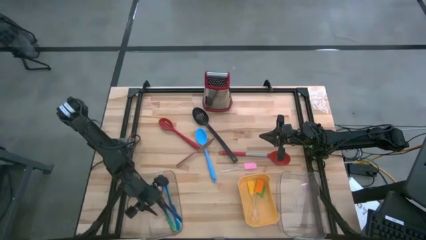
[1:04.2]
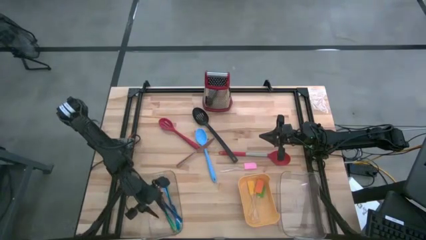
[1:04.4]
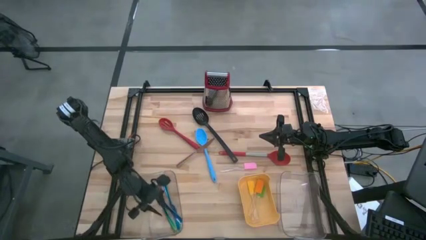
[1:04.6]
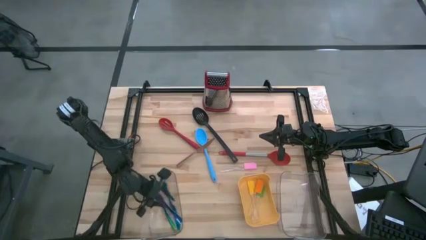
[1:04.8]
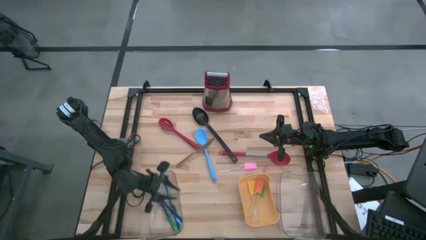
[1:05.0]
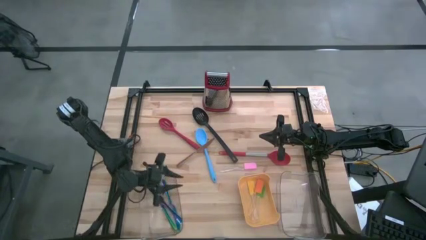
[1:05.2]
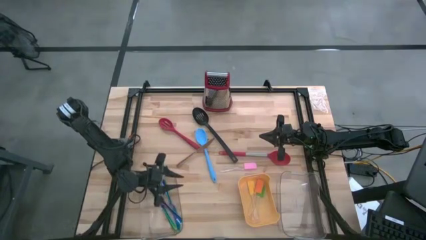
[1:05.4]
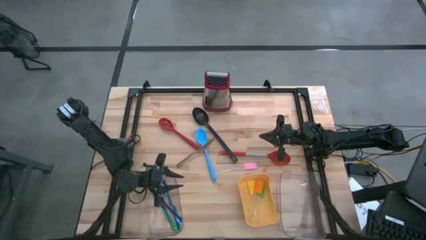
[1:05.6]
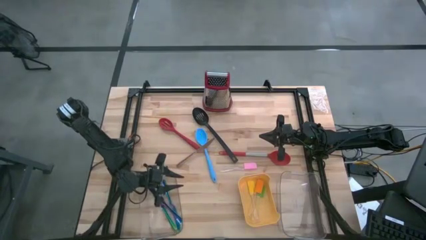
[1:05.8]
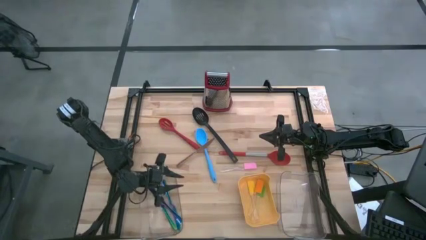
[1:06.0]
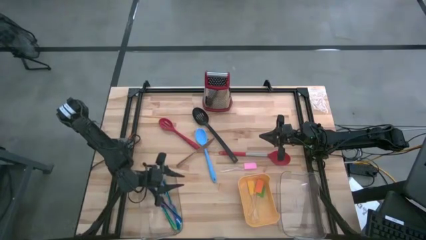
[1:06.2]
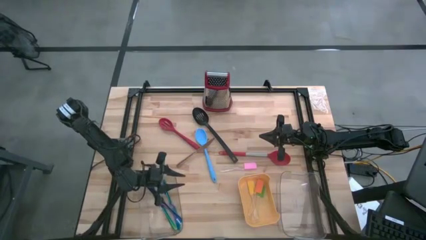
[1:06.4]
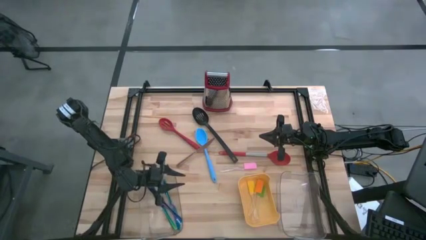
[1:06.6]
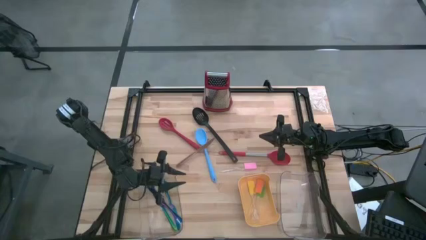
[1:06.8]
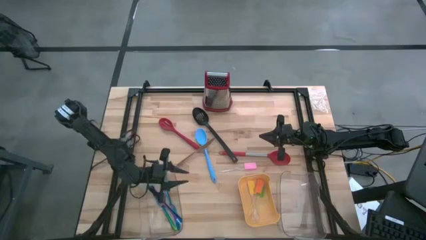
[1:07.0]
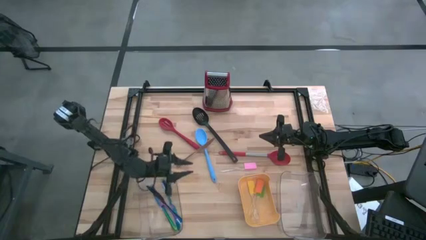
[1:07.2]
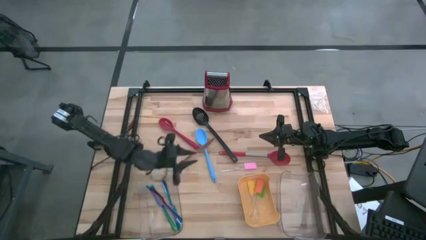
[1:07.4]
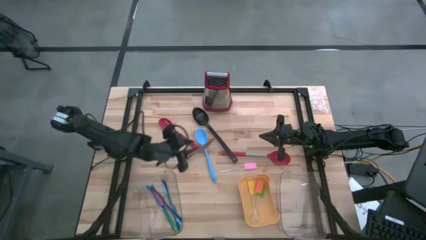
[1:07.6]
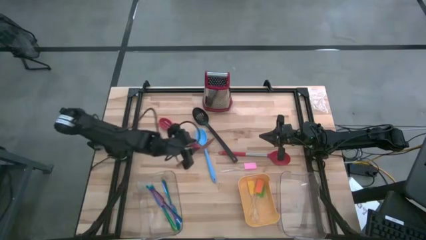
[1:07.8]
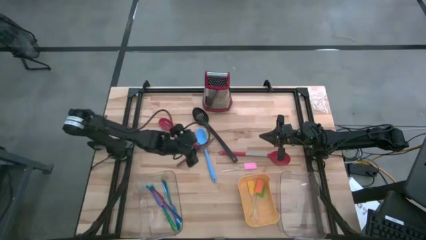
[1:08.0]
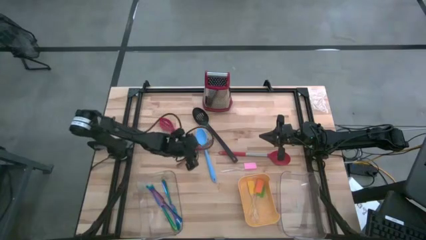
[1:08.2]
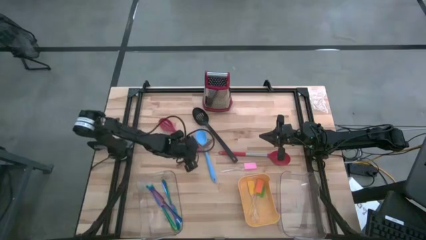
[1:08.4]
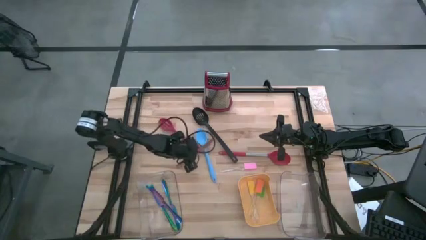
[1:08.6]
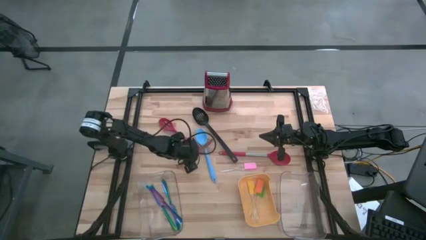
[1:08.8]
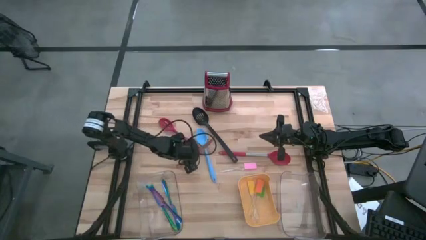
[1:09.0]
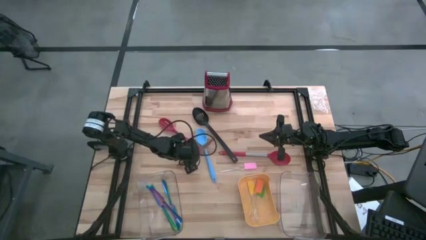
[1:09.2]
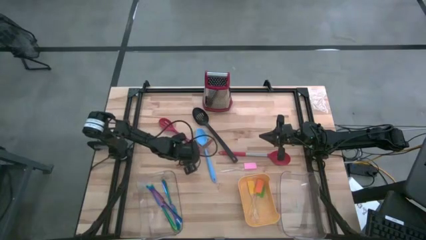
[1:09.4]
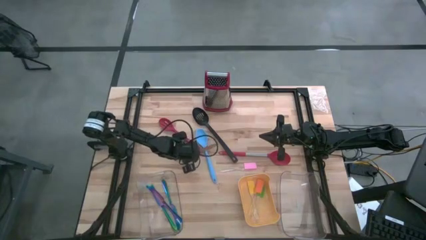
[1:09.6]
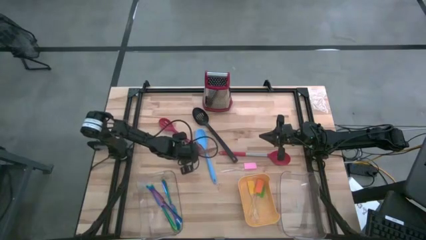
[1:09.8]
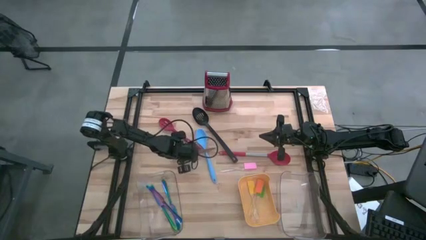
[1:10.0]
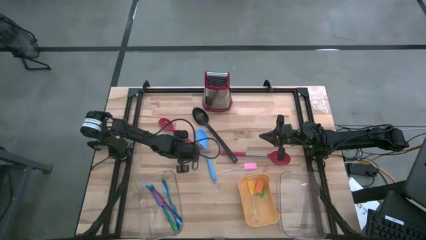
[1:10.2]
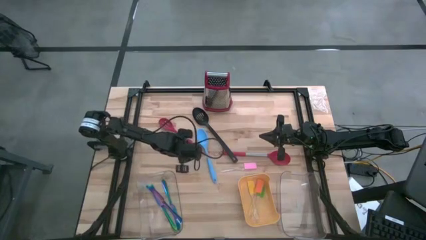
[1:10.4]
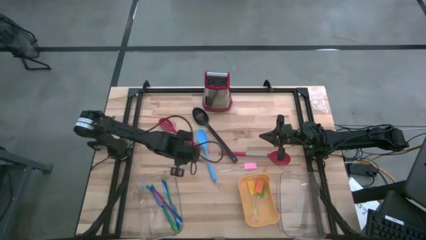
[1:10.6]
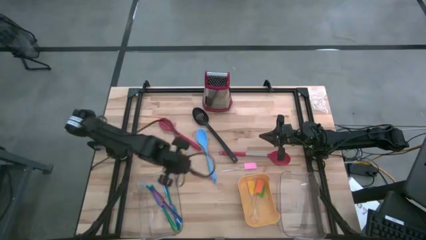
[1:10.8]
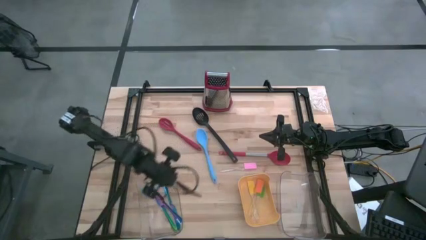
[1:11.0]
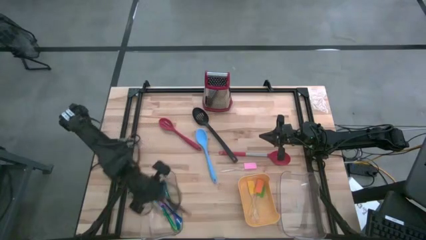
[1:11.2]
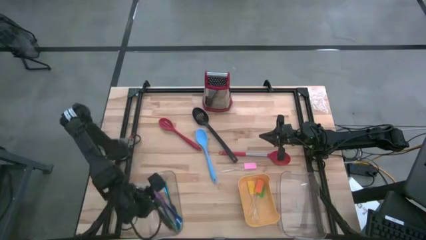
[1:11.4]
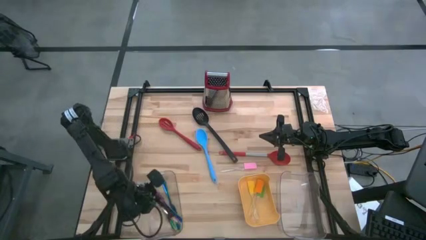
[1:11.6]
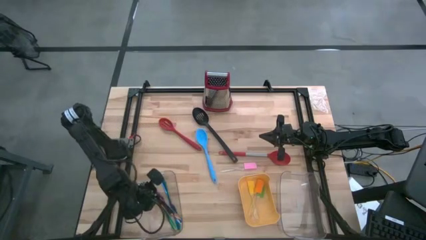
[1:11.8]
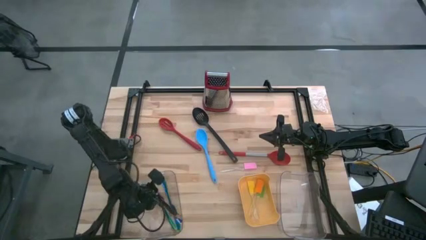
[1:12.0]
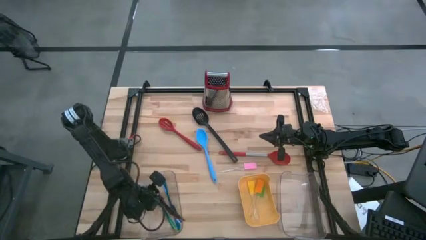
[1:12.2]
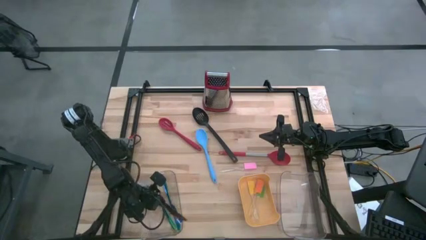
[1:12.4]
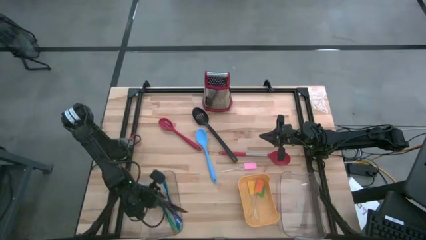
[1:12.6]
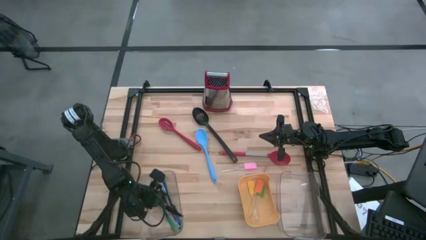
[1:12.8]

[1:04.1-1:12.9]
Task: Pick & Place Kitchen Items
Put the gold knife into the left transparent bin

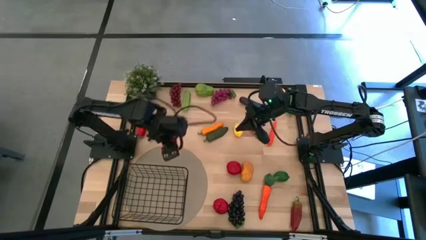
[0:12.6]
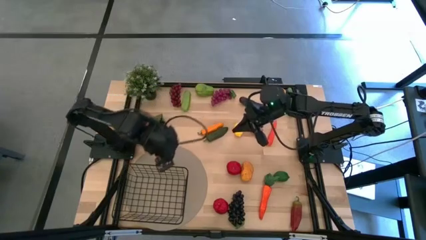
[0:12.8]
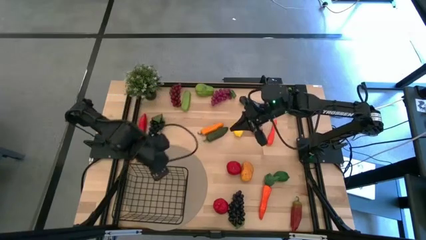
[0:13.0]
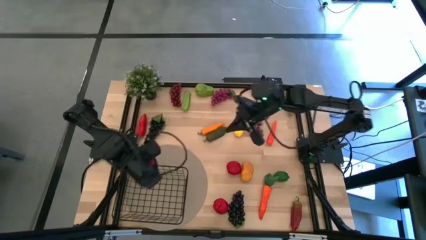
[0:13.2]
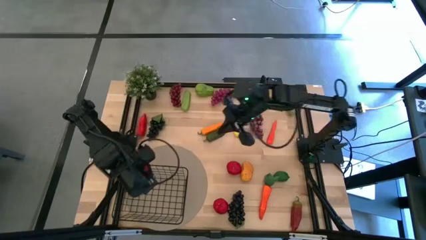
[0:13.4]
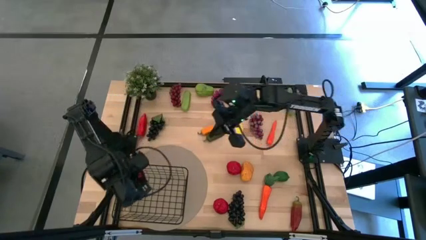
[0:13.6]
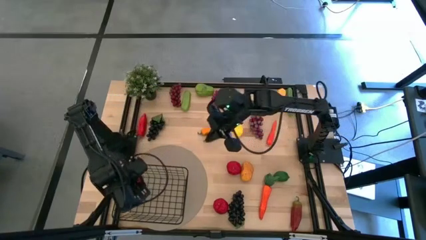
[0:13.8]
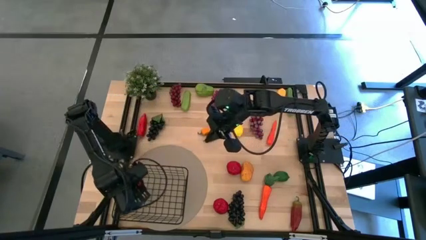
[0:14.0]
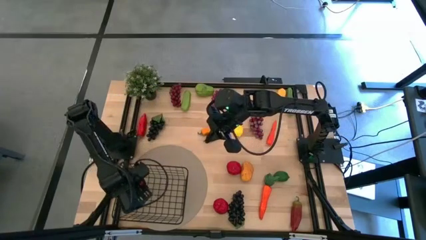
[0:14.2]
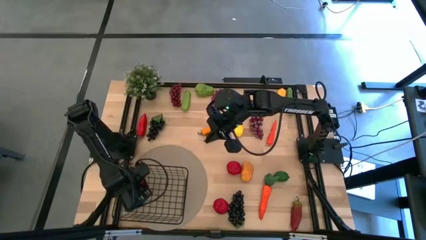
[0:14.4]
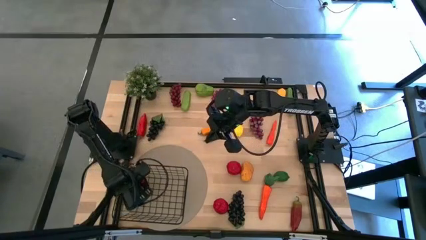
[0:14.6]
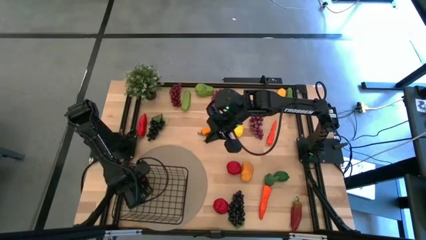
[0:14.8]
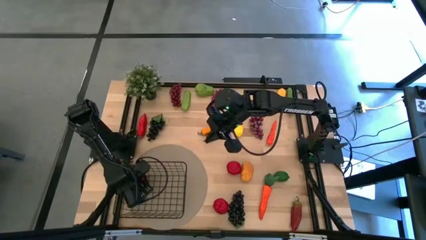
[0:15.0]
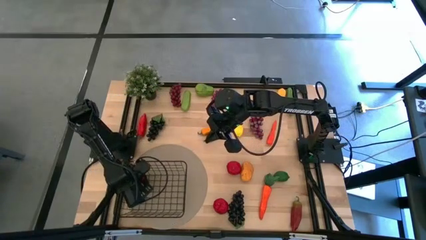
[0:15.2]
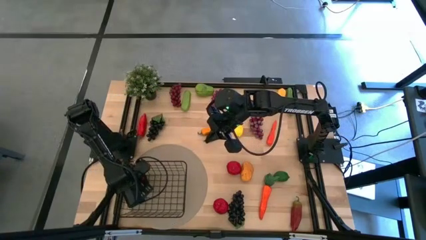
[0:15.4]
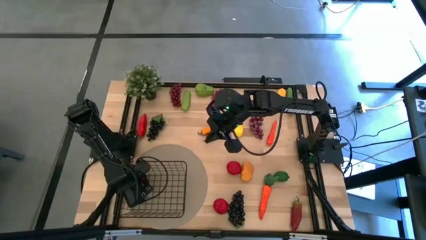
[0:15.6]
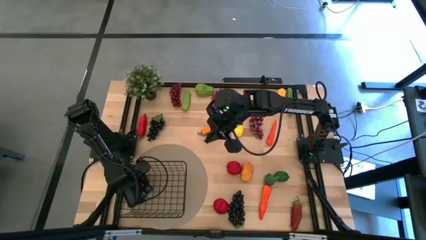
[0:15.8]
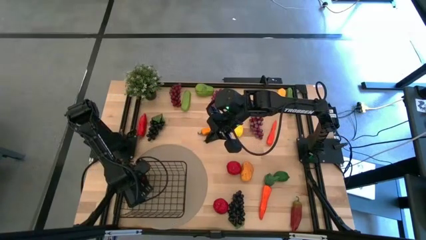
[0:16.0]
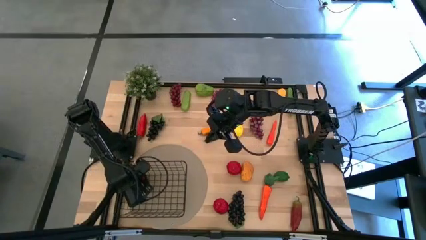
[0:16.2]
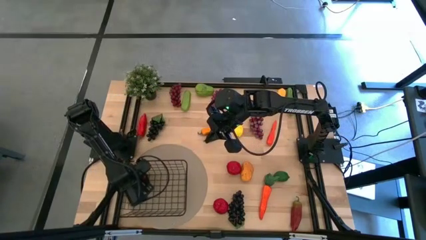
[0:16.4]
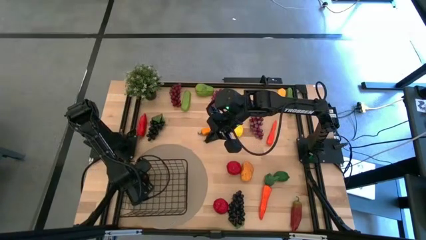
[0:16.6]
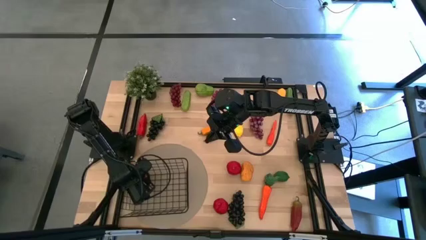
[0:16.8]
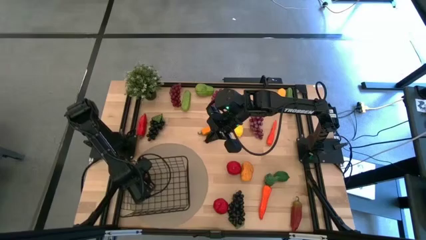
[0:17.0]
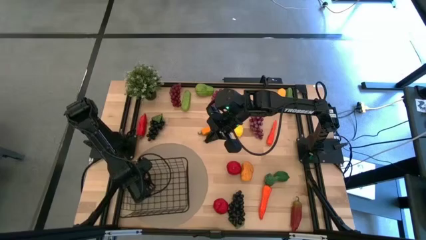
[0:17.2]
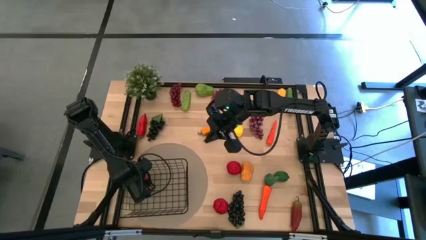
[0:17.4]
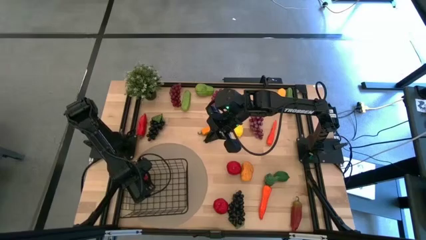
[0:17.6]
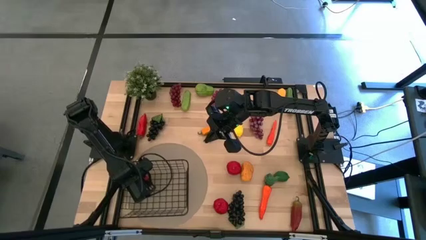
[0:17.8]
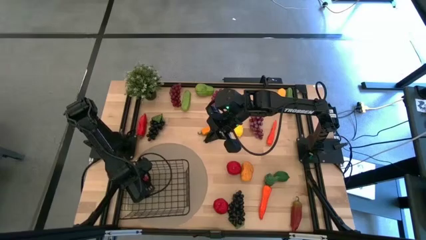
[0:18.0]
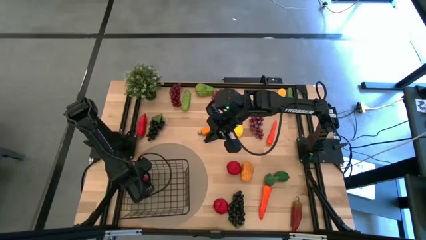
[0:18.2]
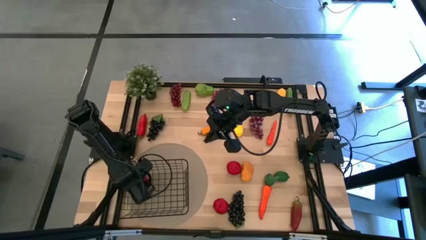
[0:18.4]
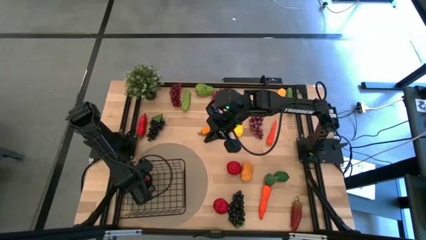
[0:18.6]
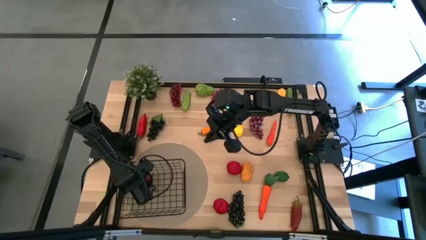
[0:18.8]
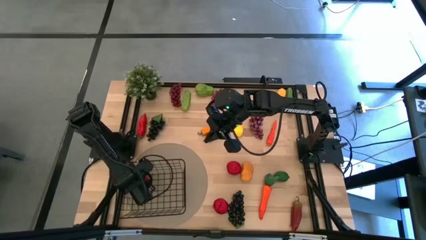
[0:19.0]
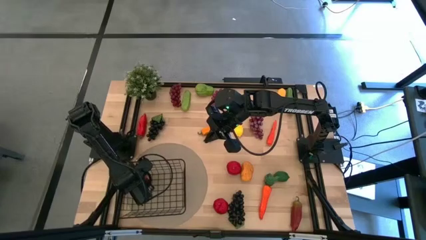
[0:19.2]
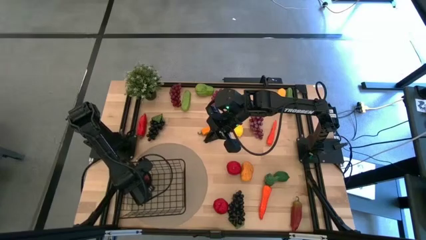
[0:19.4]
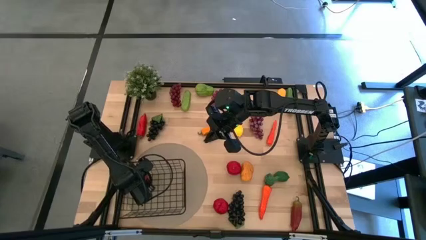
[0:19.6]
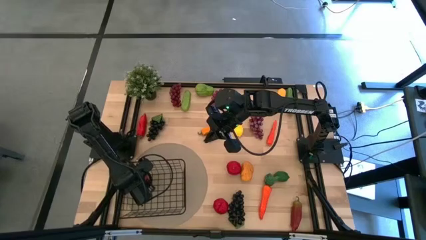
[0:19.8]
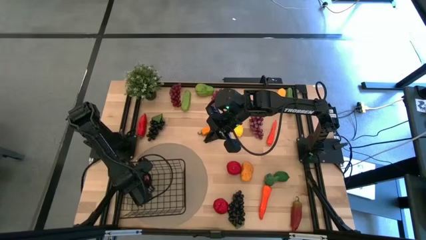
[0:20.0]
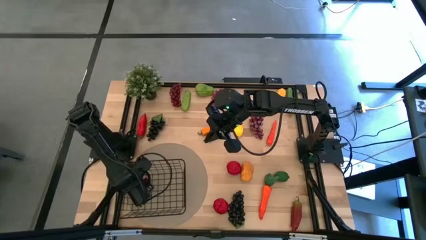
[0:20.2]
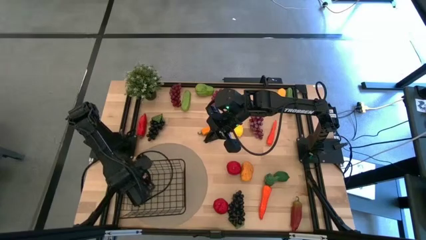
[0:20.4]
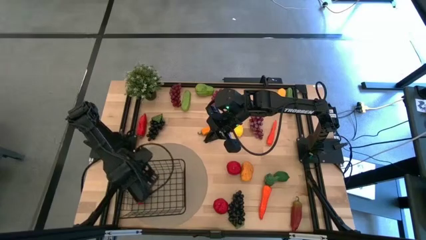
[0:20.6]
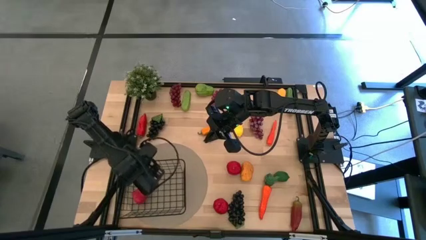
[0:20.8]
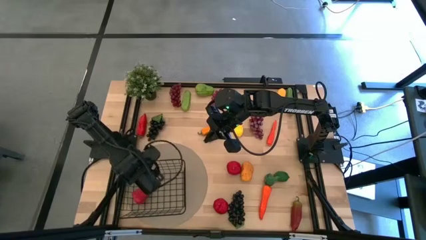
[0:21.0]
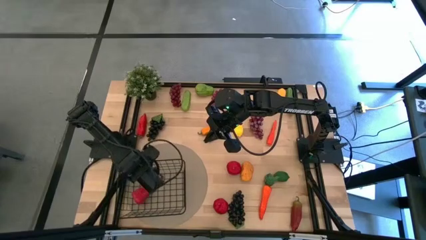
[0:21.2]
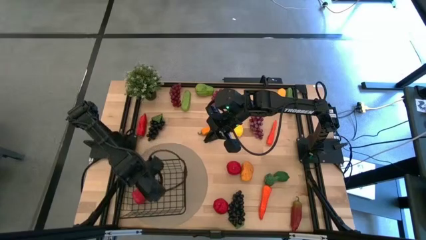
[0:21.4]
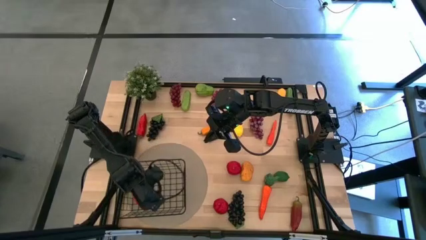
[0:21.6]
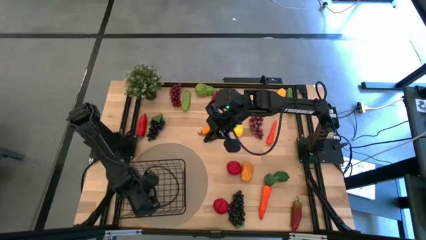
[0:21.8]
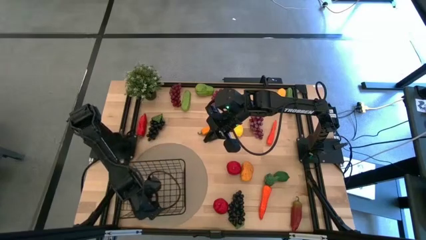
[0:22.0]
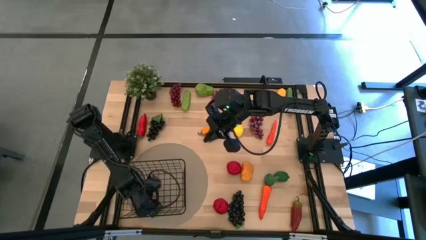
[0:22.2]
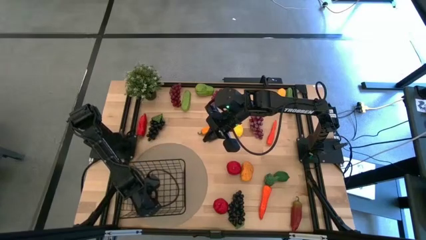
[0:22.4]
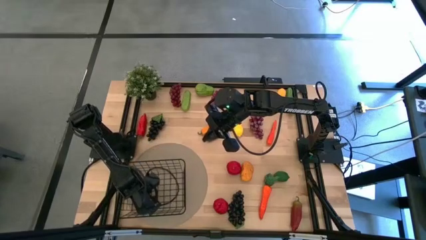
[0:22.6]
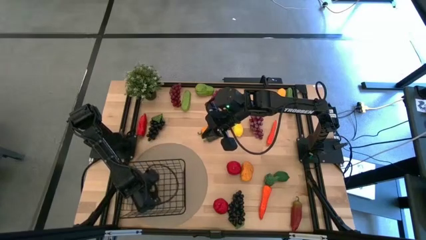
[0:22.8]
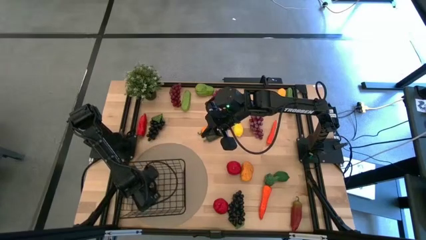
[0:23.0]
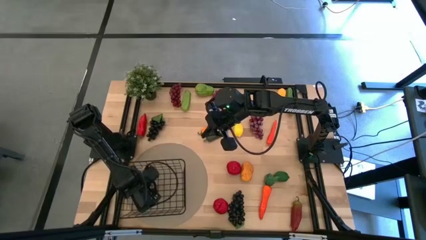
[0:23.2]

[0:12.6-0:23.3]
Task: Build produce basket
Put the red bell pepper into the black wire basket
